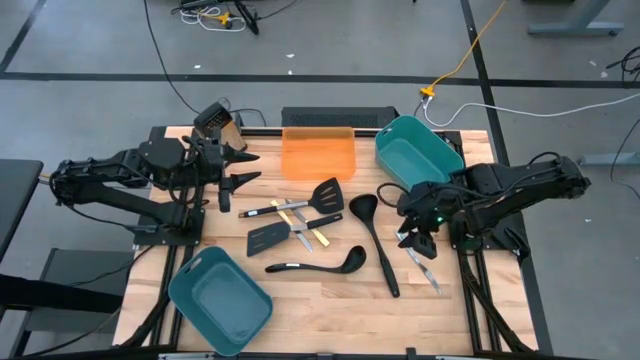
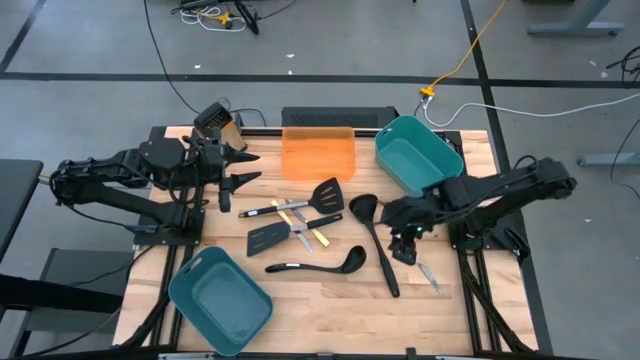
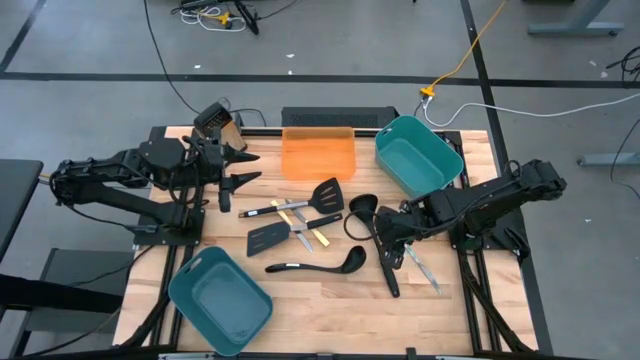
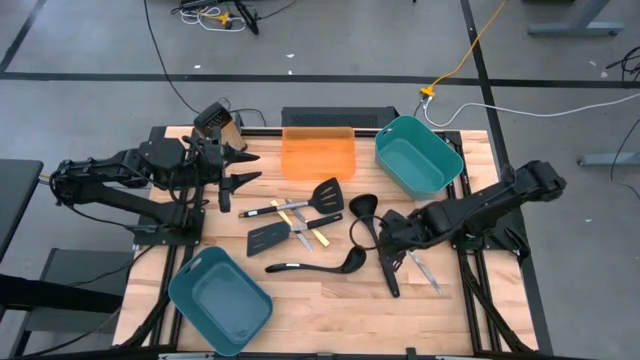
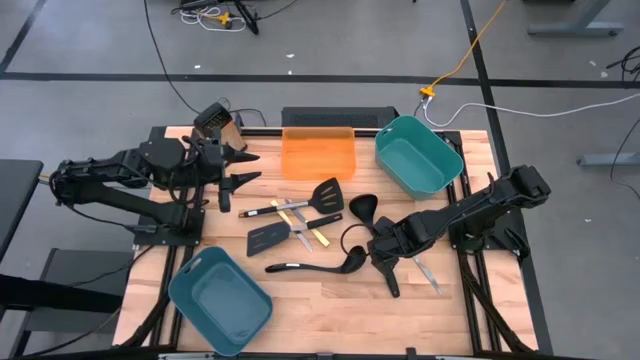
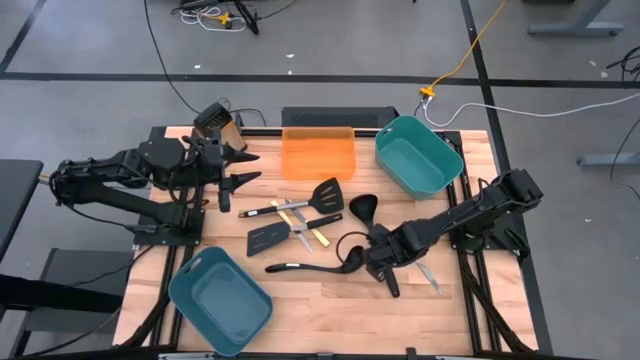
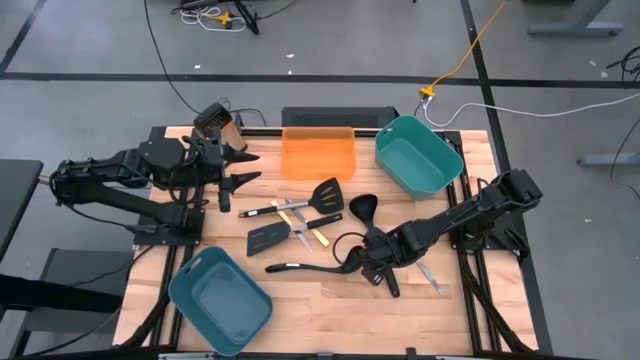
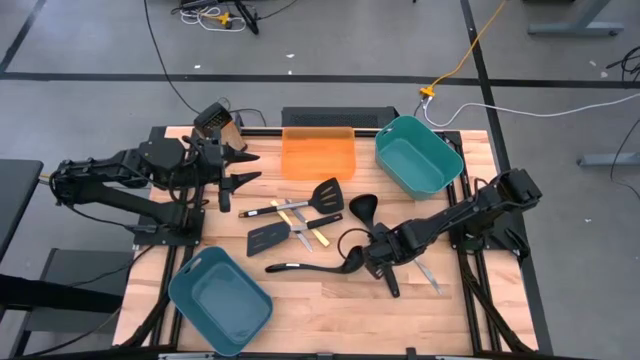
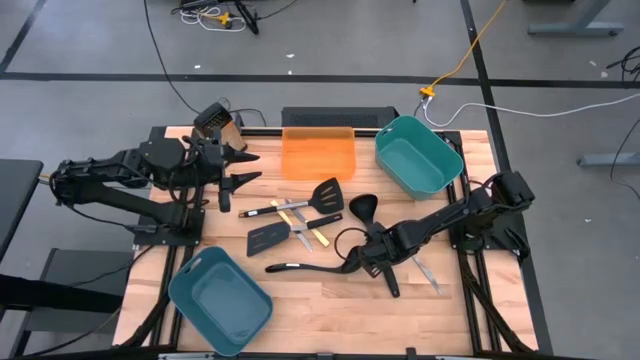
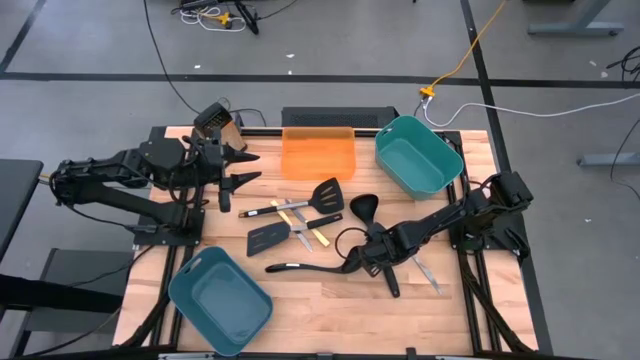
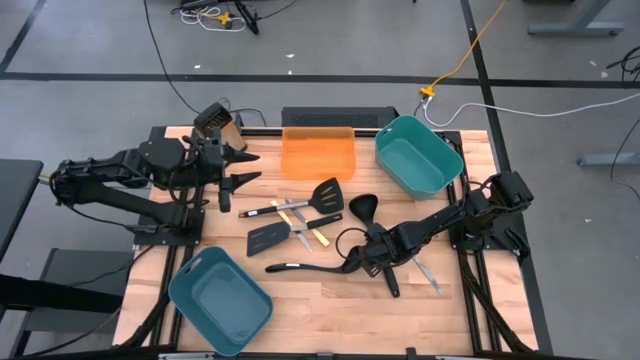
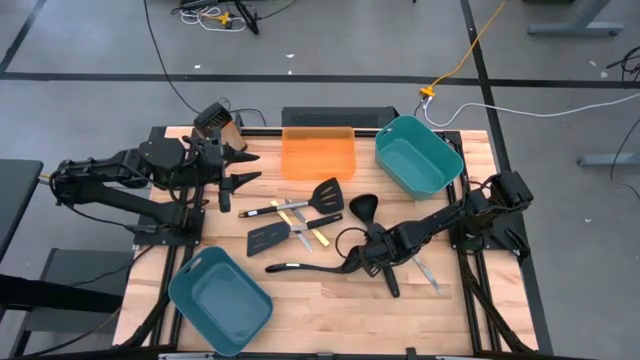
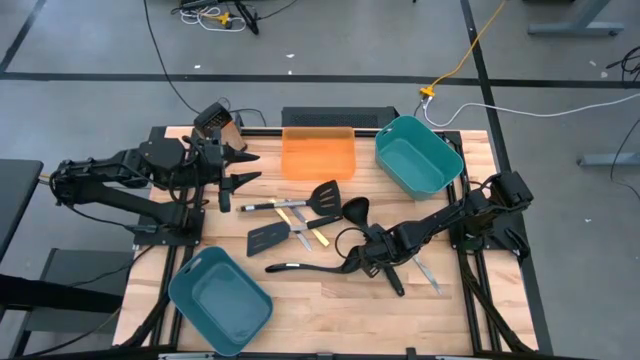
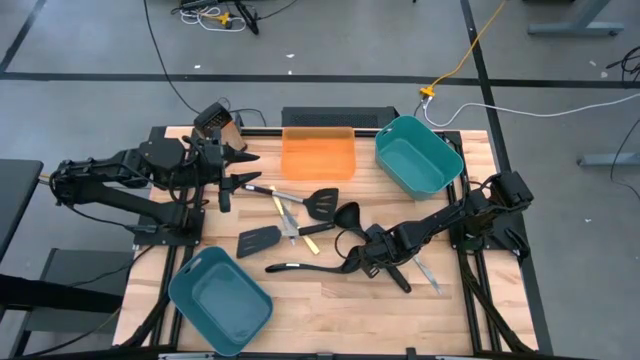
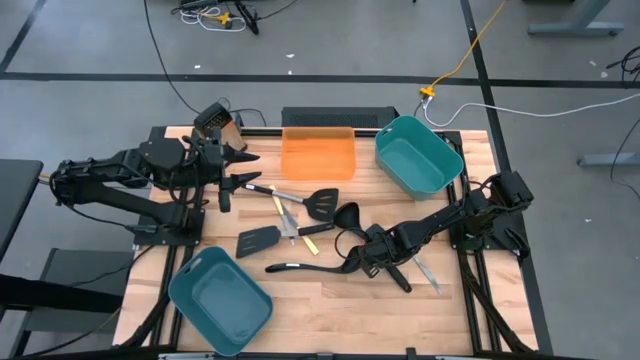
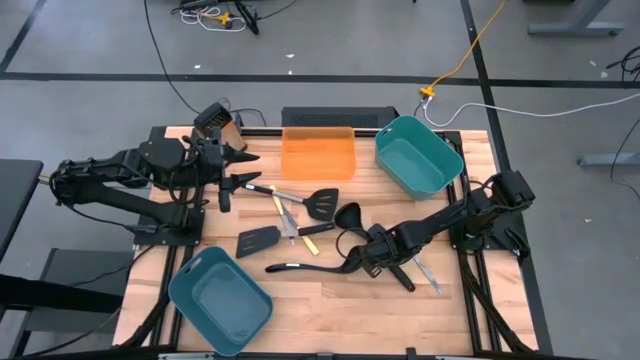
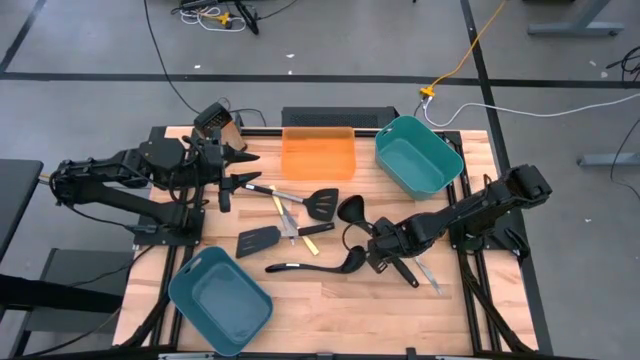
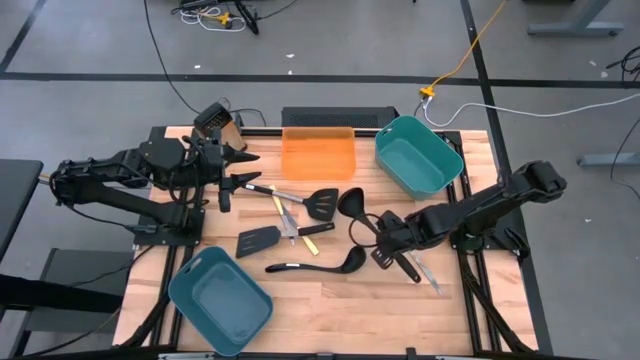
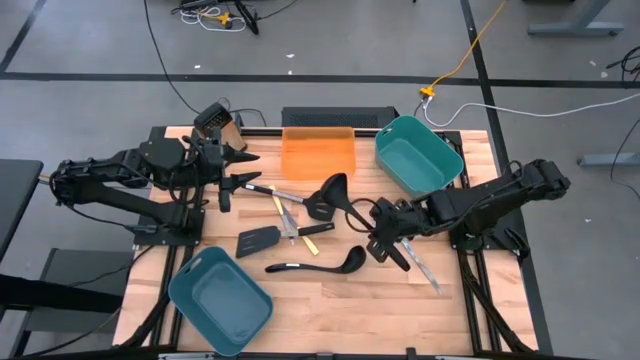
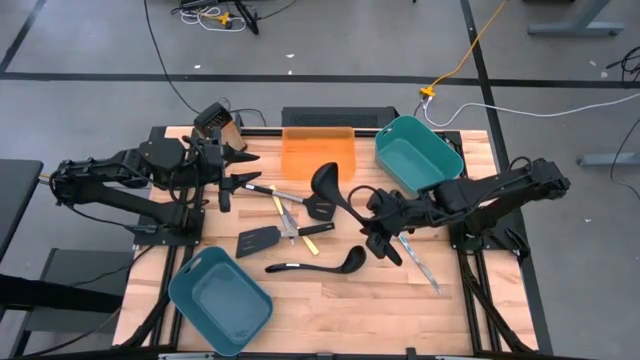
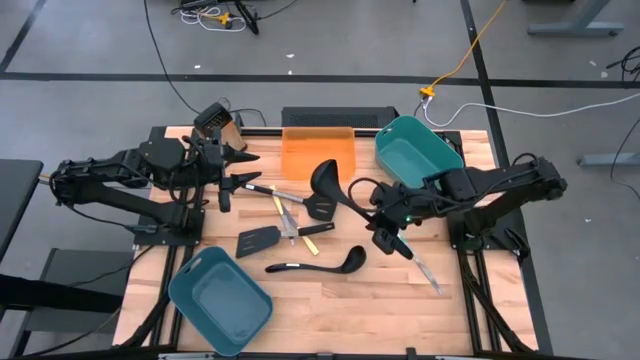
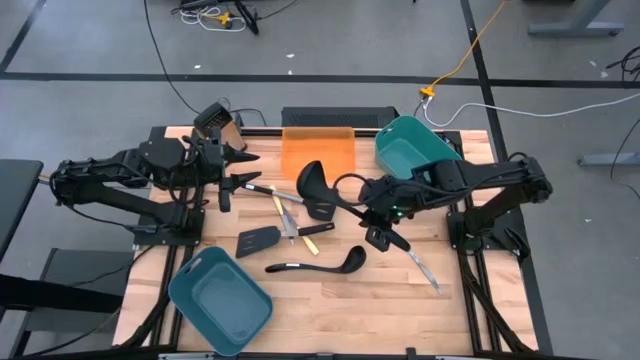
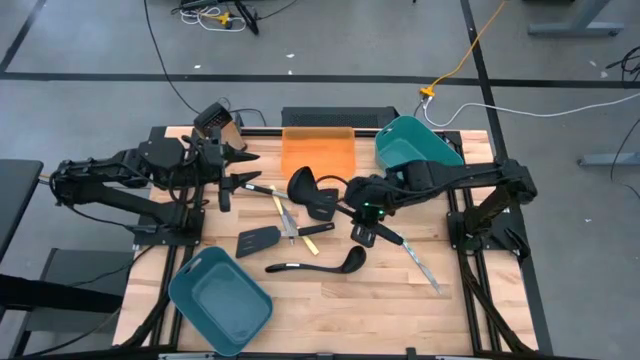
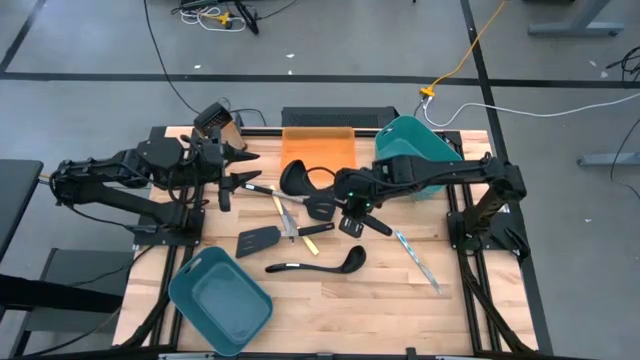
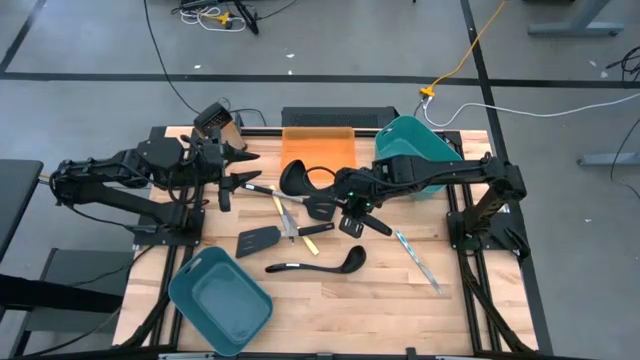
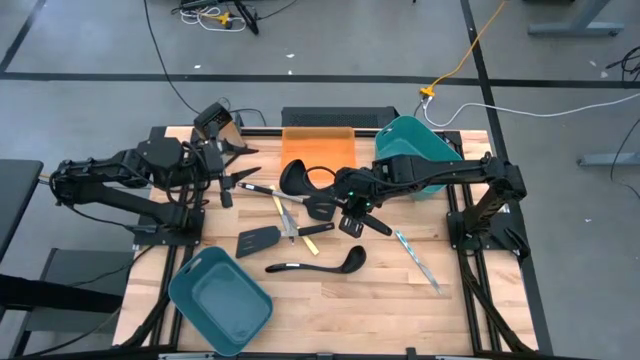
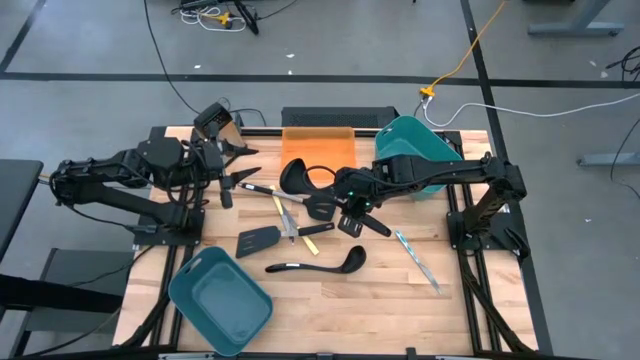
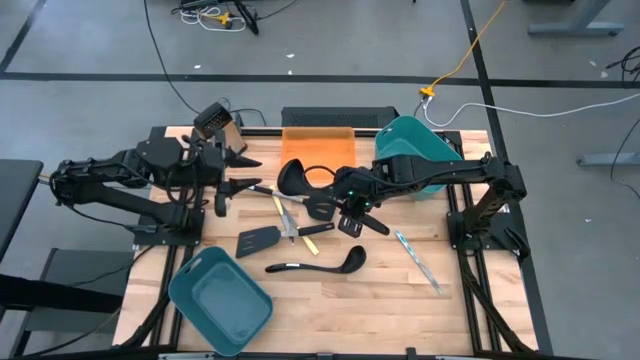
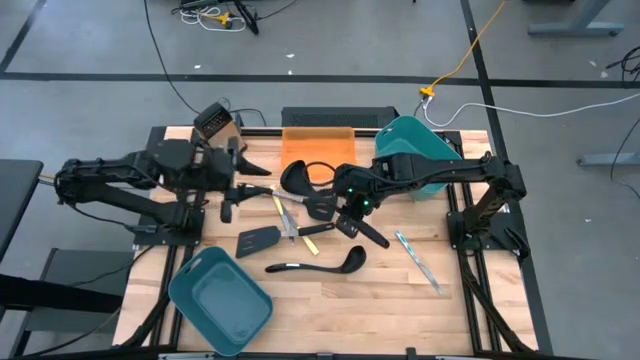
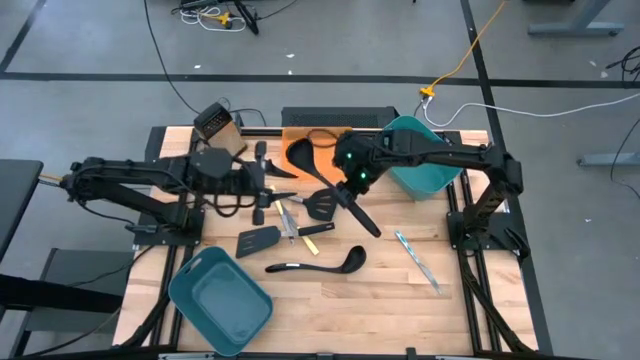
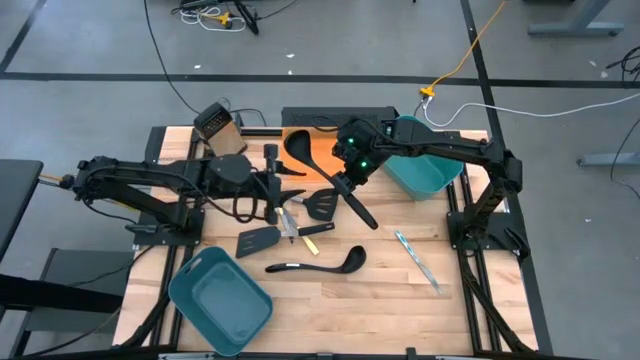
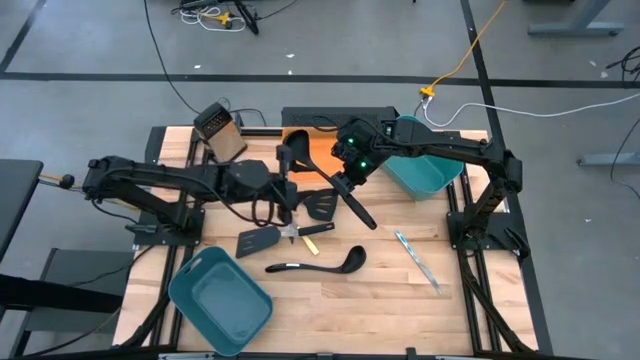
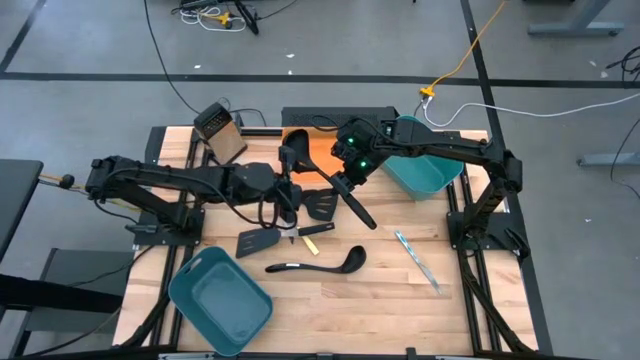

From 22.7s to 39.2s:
Task: Pick & Place Kitchen Items
Put the right black ladle into the blue bin

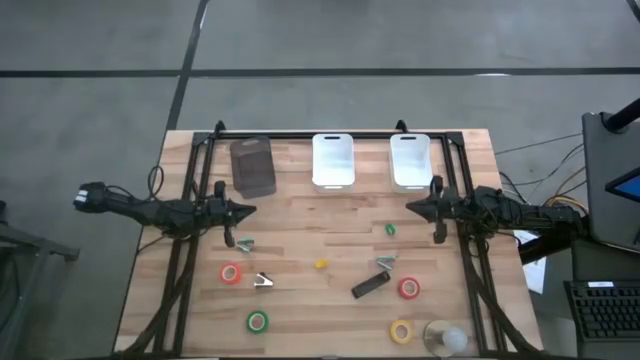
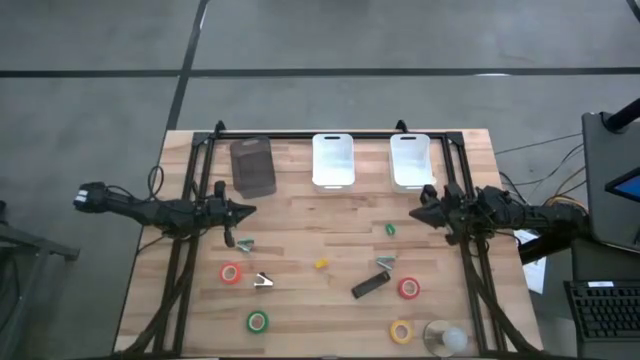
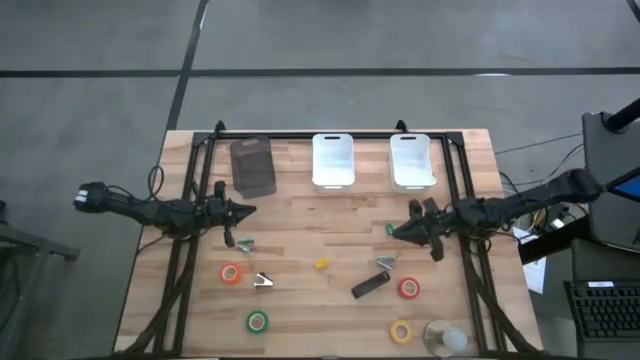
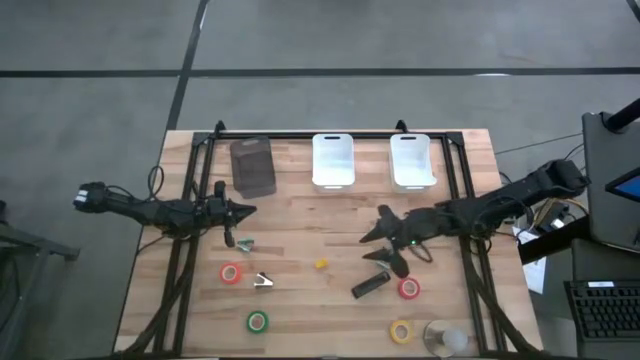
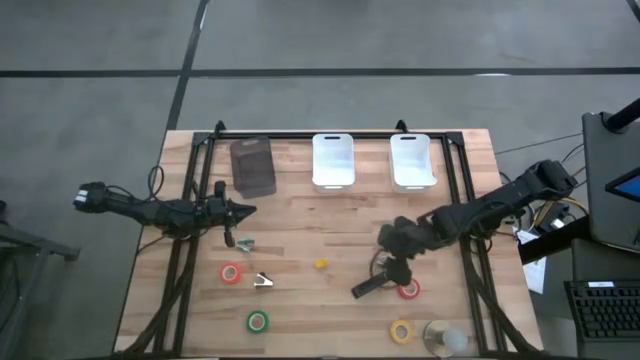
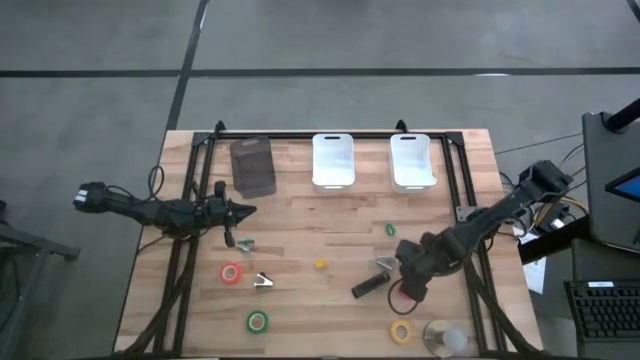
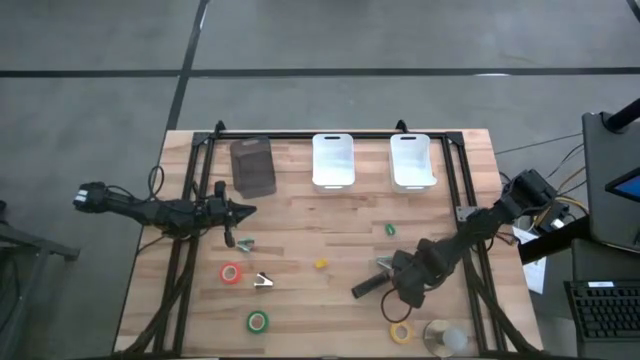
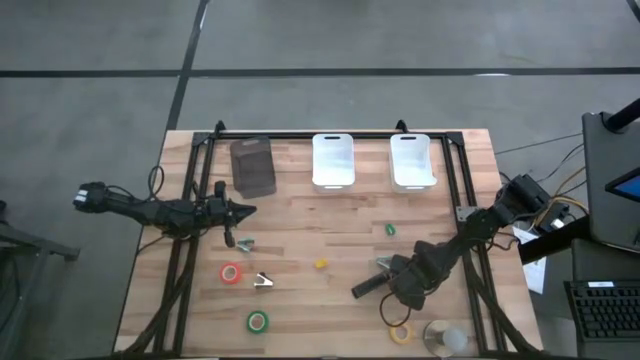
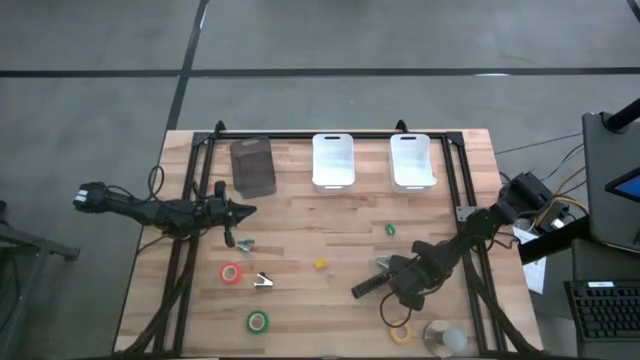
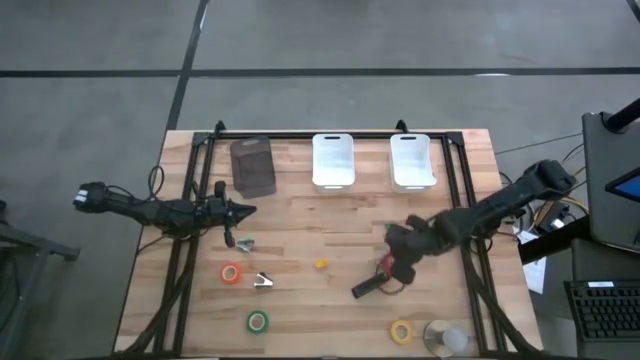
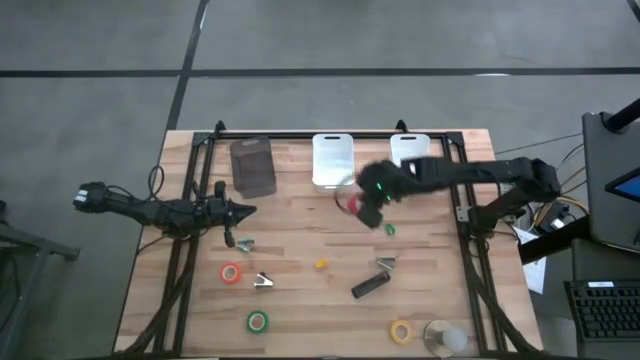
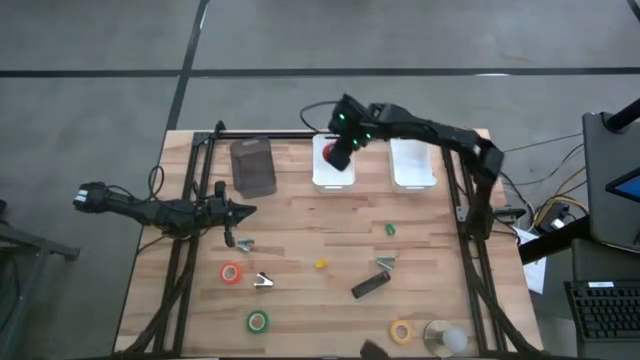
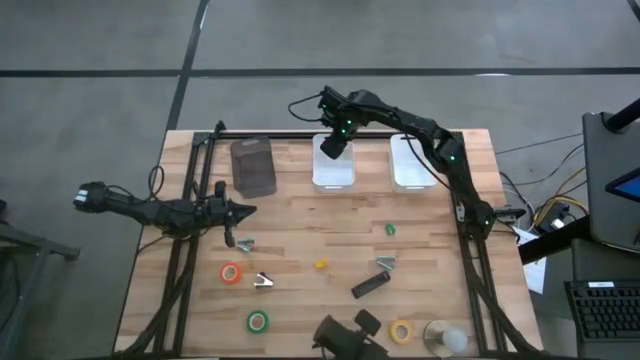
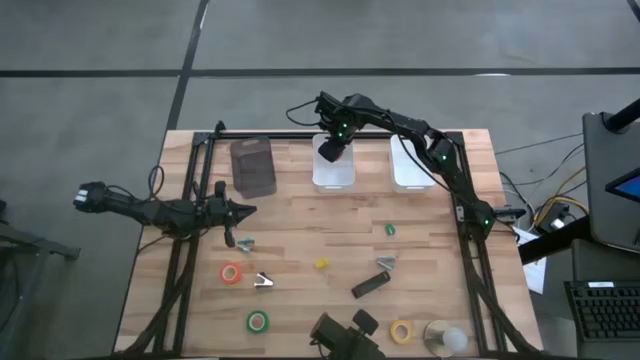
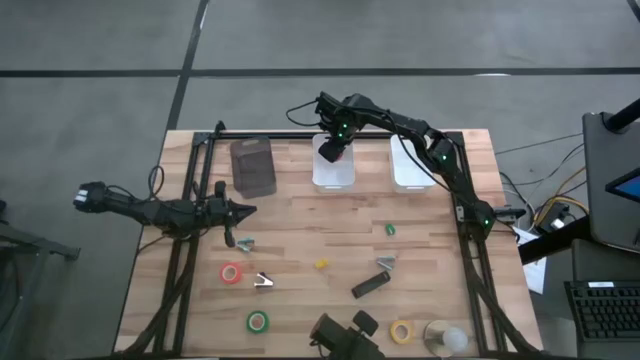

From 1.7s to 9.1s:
Task: Pick and place Stapler, Stapler remover, tape
Put the red tape into the left white bin
